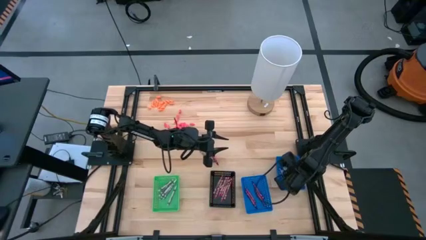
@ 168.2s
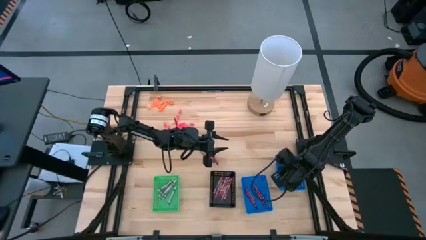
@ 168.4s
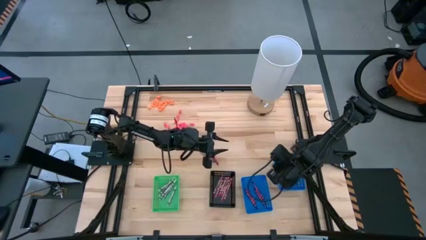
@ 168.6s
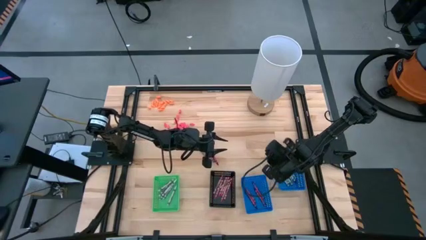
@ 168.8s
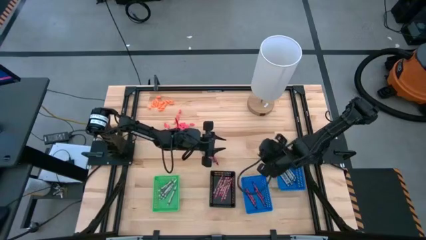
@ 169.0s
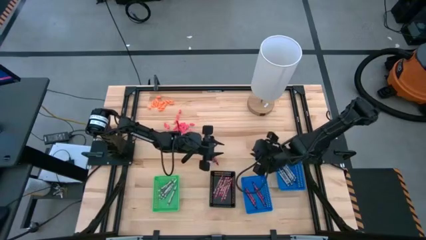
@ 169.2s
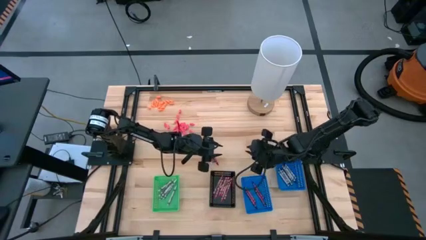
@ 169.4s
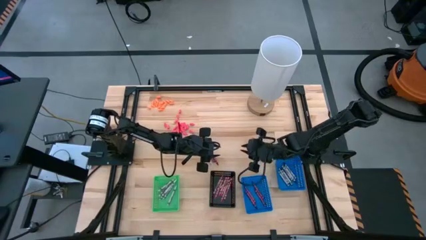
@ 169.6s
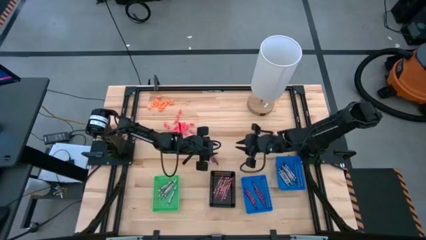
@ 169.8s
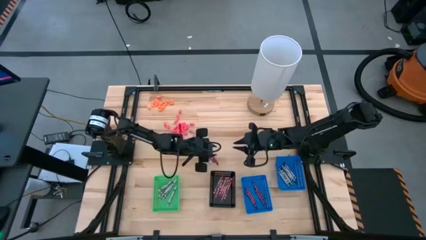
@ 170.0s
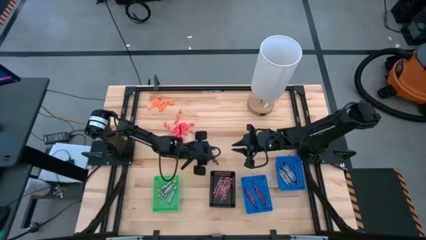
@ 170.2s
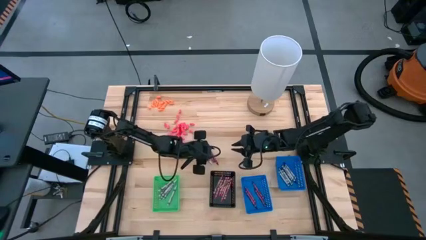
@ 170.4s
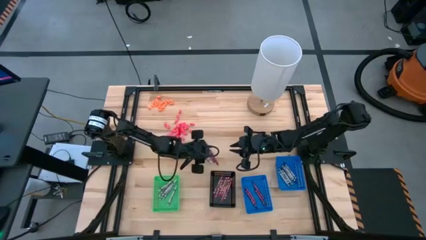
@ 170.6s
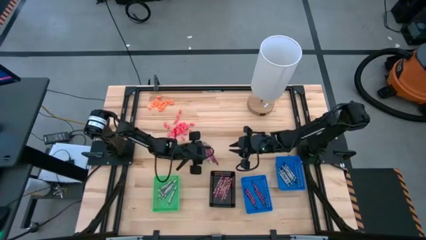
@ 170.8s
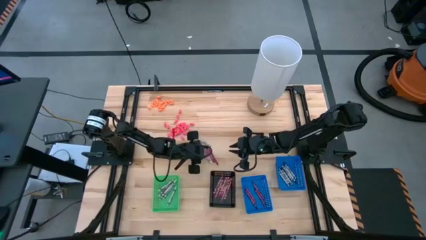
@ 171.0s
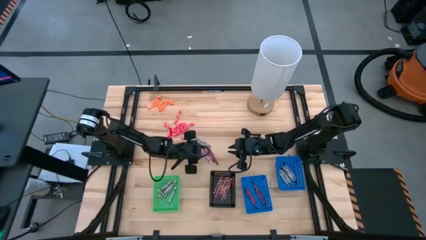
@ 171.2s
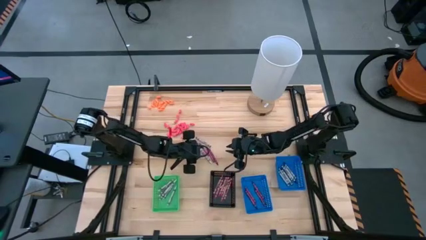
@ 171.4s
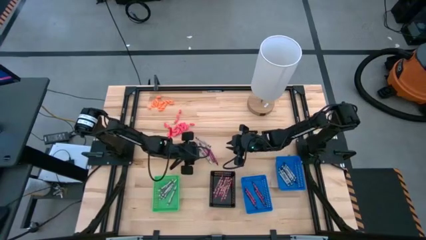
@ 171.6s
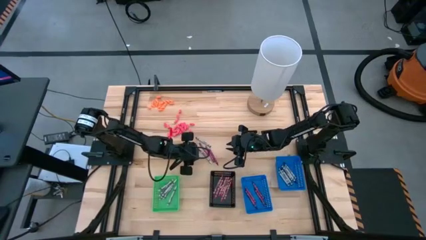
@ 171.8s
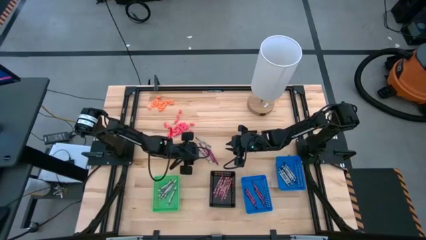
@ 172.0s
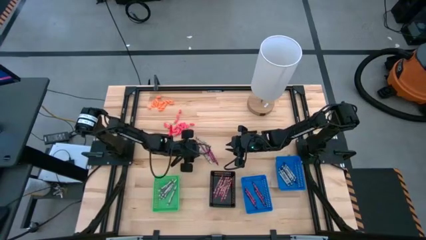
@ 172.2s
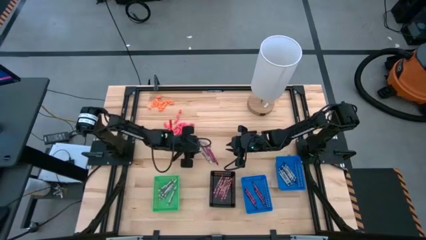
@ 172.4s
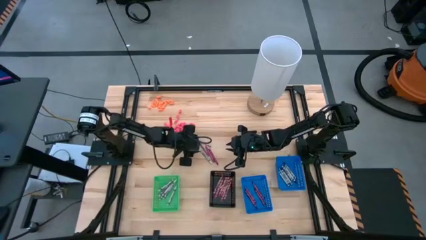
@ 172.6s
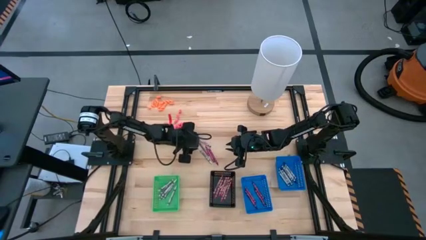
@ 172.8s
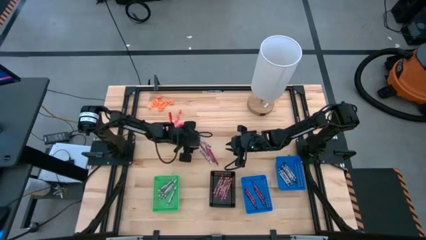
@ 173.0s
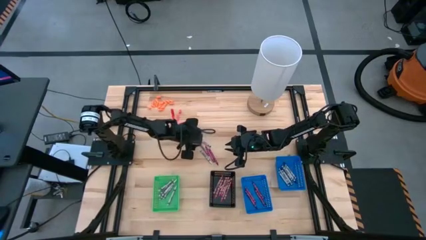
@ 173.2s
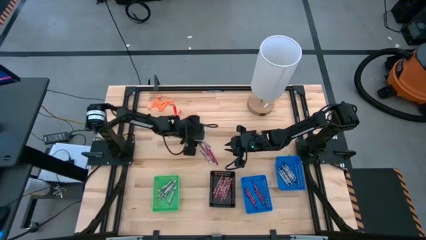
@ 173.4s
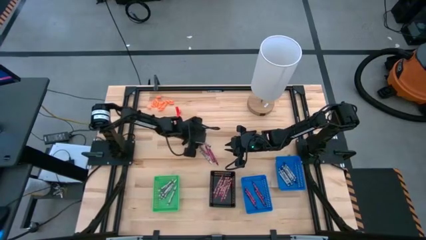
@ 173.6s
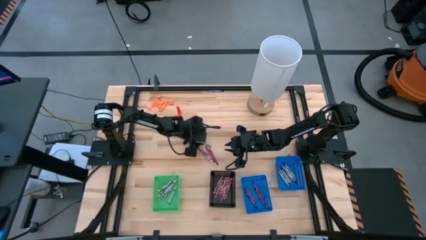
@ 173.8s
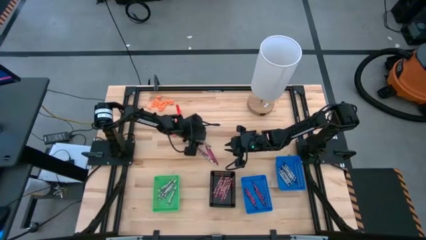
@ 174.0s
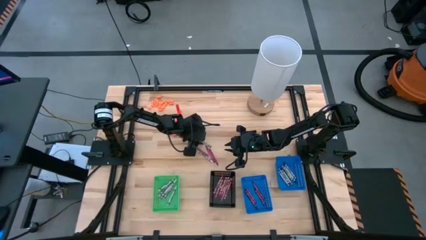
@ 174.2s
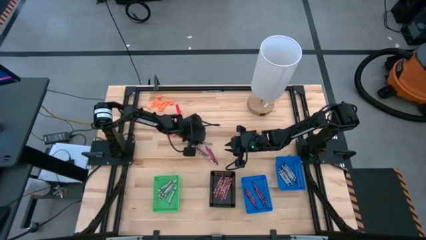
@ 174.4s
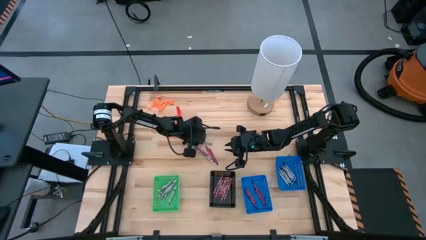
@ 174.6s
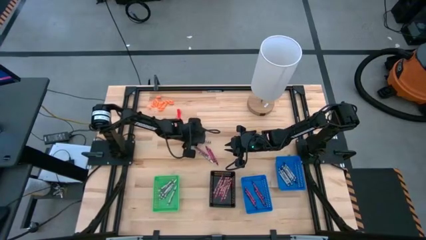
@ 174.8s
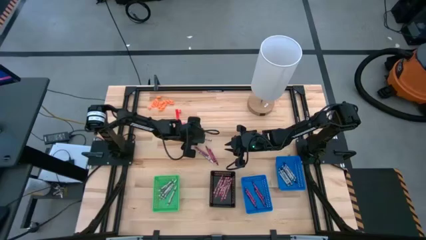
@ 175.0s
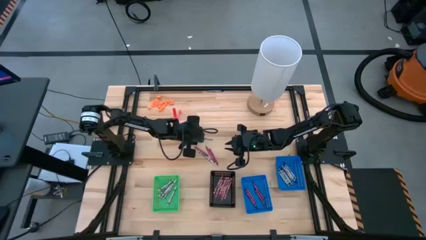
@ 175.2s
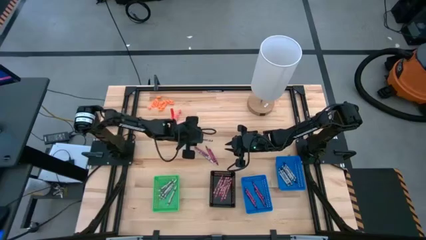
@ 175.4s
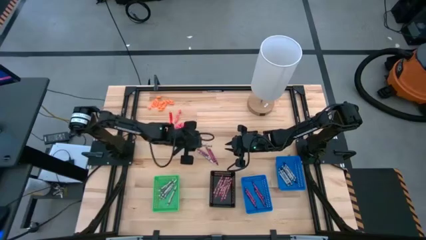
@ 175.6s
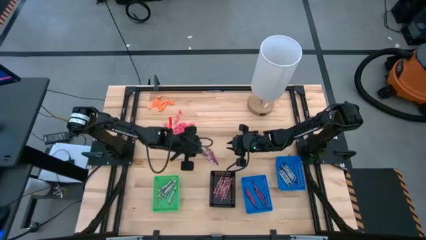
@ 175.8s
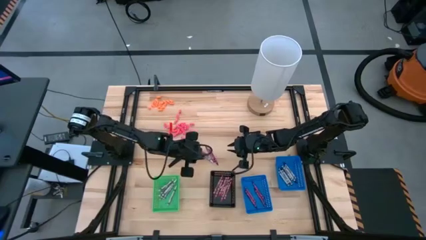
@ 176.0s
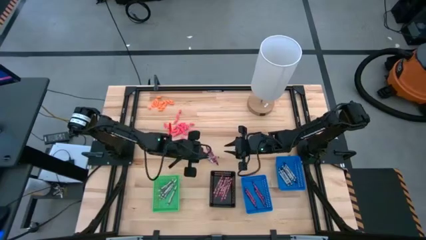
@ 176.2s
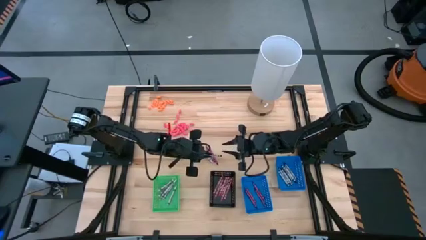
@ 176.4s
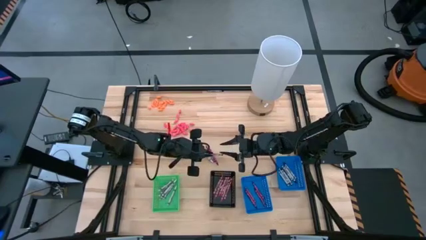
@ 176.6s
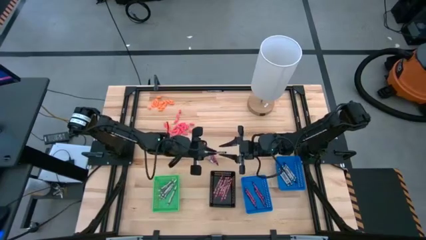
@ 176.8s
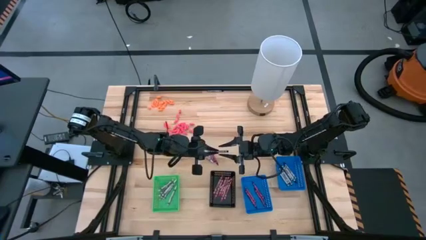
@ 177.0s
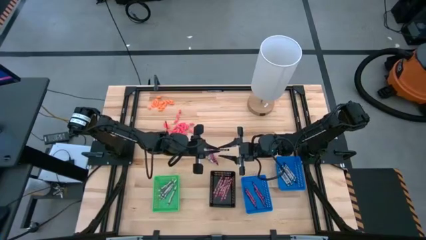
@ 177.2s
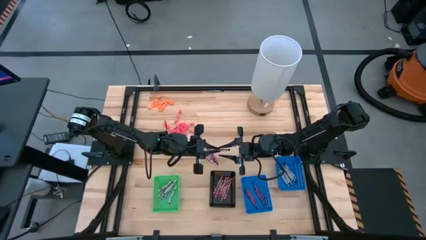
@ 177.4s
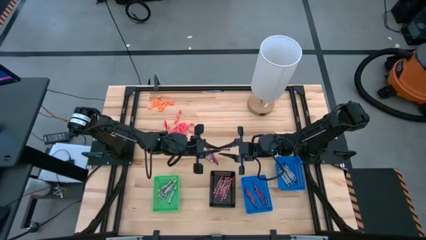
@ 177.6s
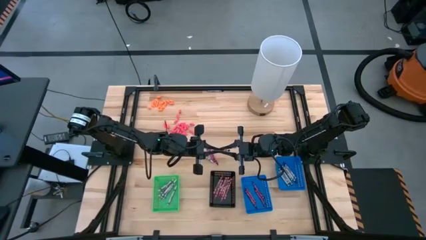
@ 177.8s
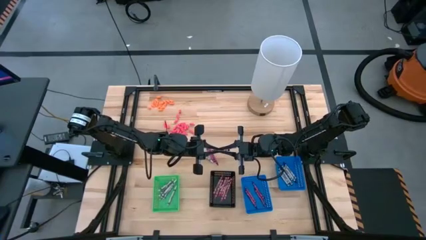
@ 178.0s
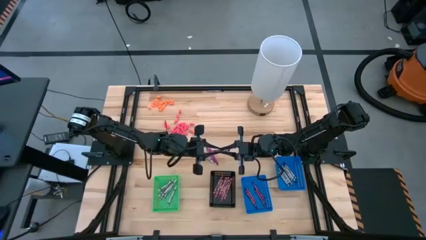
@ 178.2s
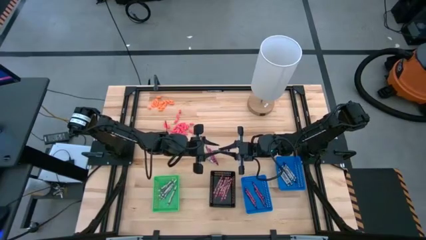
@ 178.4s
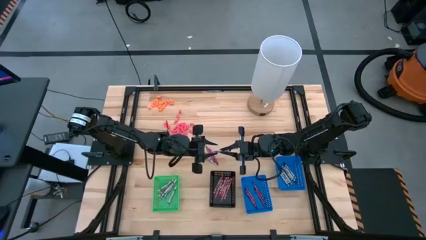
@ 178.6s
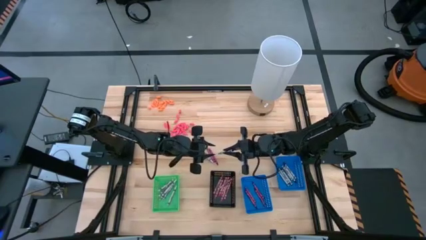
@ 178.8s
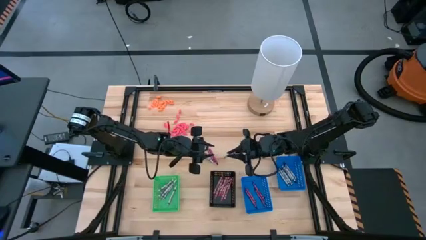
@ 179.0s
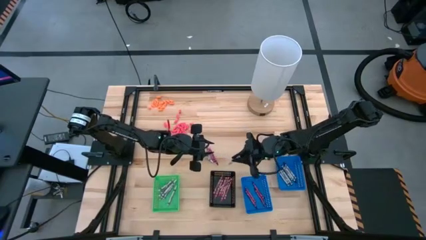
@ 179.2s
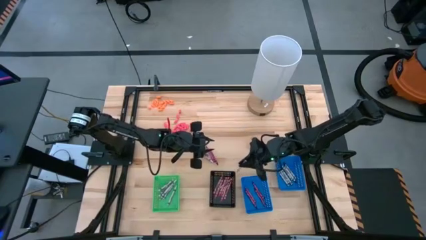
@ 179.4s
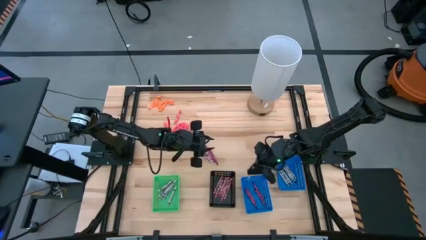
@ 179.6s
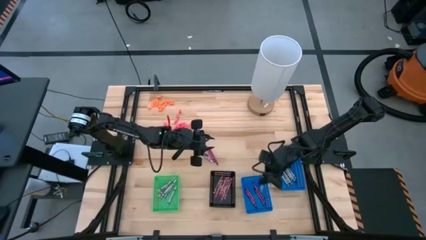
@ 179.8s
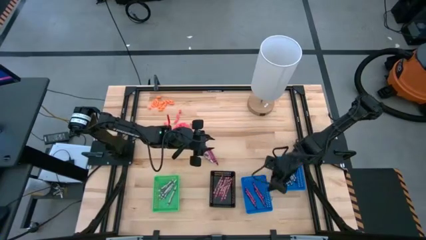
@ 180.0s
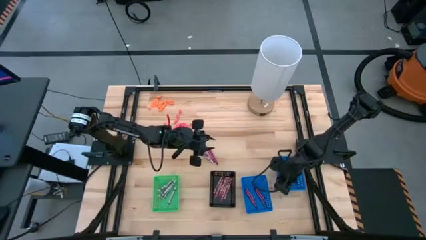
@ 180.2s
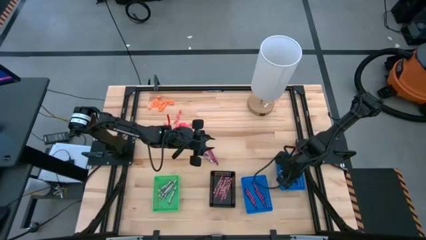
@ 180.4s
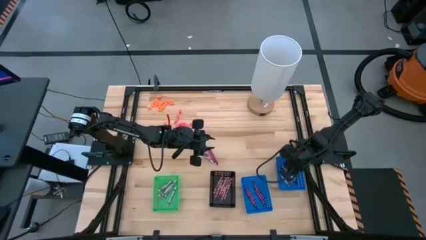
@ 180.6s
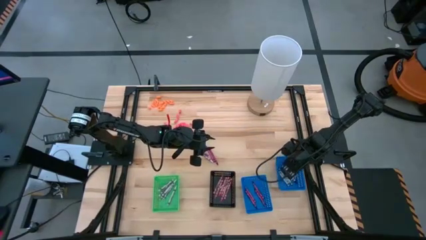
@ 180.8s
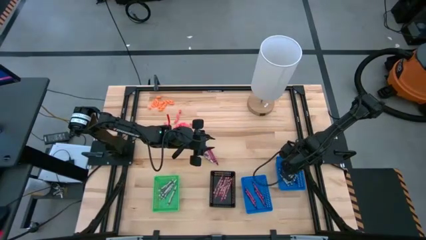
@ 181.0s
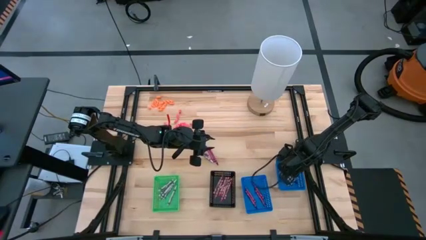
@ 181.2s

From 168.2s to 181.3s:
Task: Sort crayons
Put the black crayon into the right blue bin

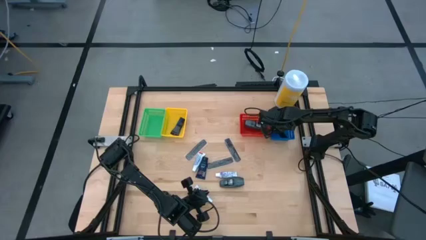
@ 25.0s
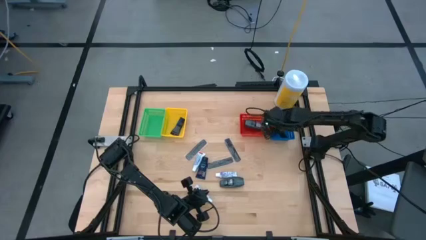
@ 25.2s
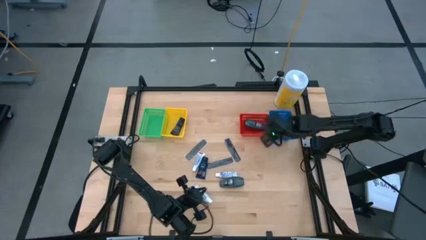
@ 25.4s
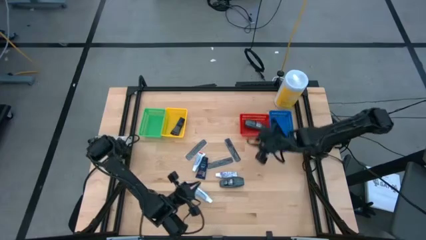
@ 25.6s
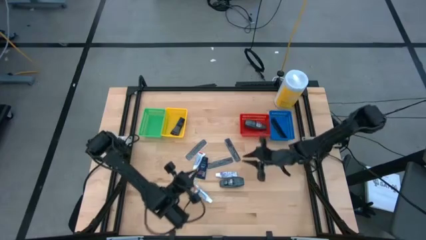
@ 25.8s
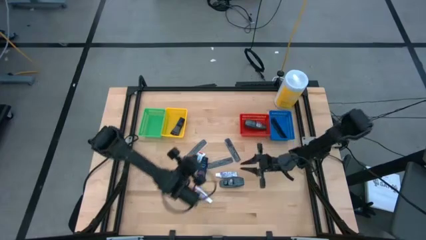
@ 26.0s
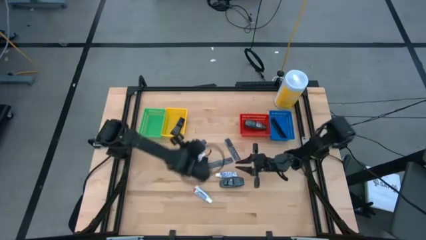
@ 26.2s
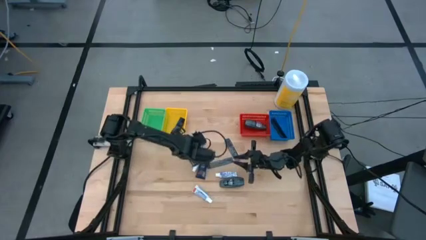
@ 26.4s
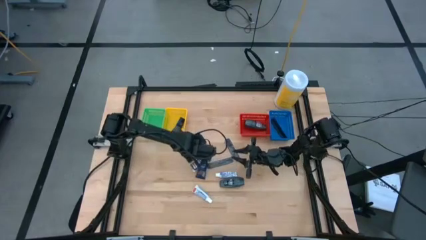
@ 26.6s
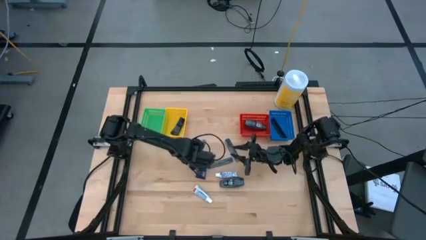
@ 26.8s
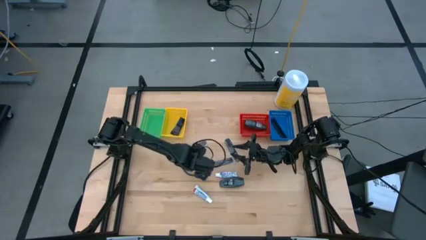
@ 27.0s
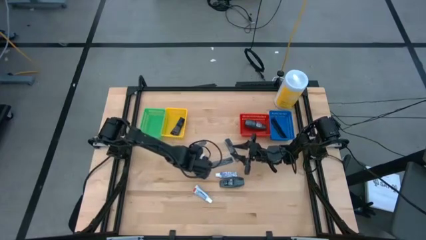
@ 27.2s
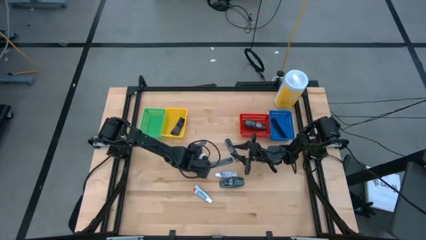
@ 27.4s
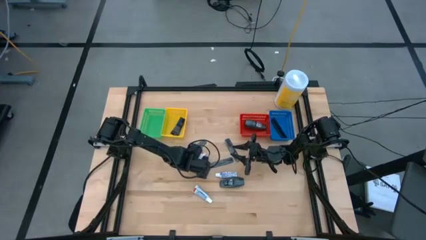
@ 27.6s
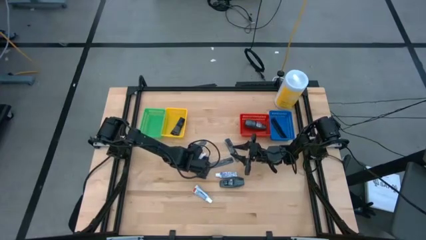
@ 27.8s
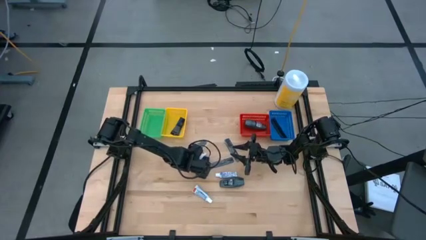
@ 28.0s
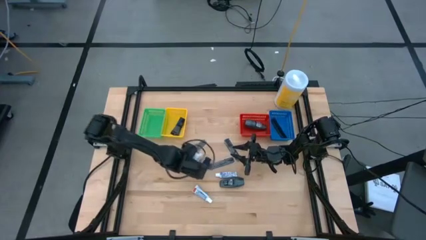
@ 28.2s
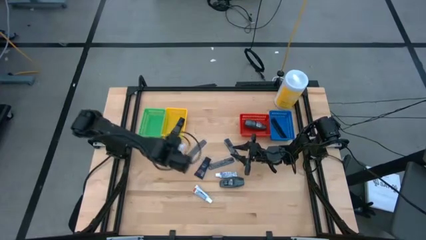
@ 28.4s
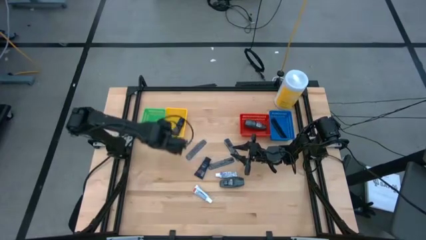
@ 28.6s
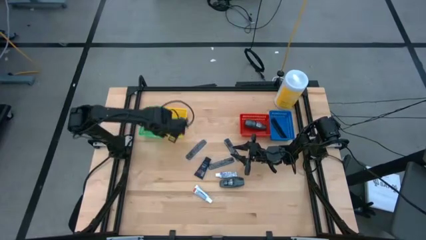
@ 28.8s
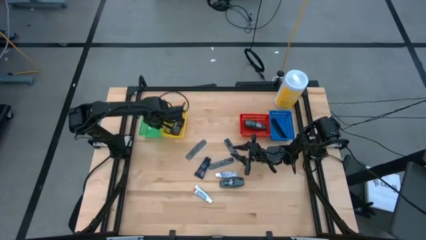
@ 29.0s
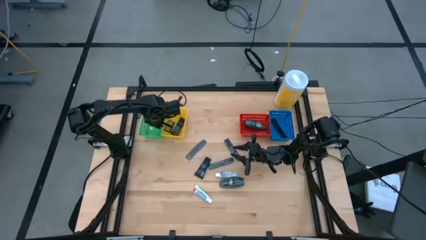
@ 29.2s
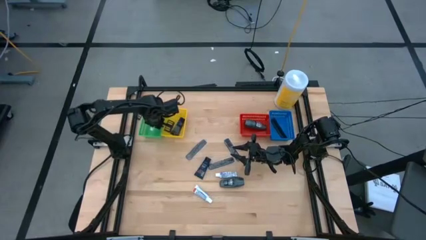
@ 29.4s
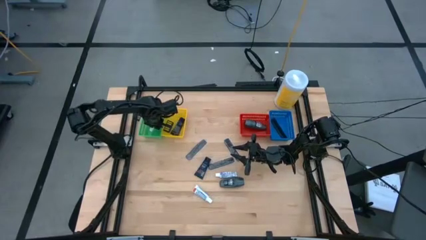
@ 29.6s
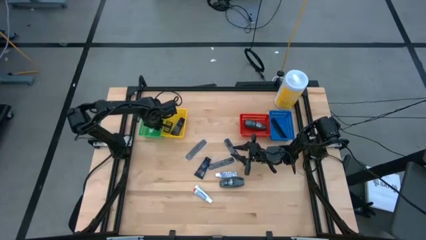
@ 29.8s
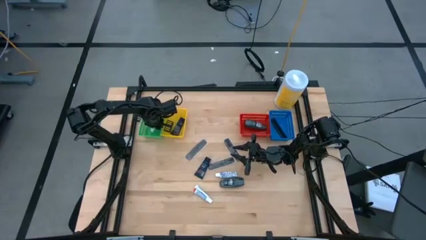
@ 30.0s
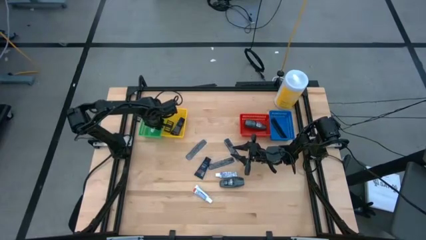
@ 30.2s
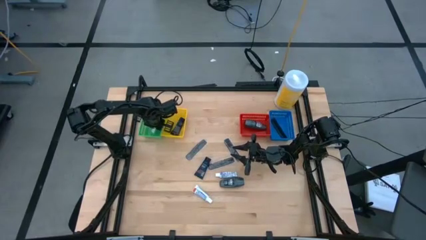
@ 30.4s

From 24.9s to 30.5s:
Task: Pick & Place Travel size toiletries
Put the toothpaste into the green bin
